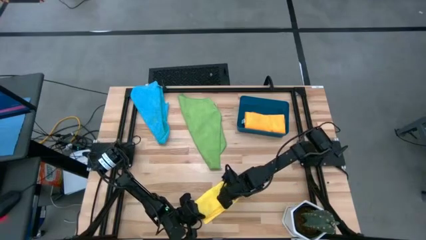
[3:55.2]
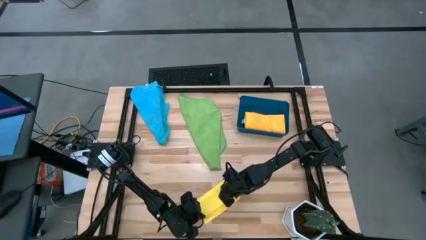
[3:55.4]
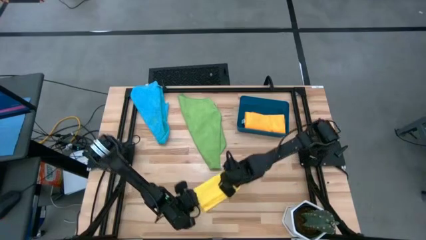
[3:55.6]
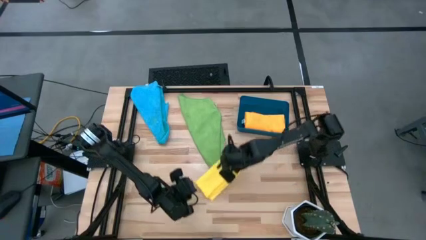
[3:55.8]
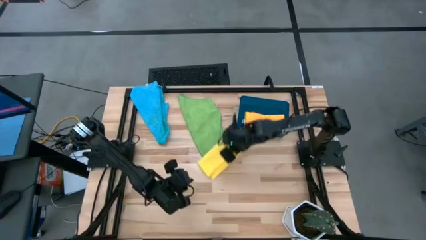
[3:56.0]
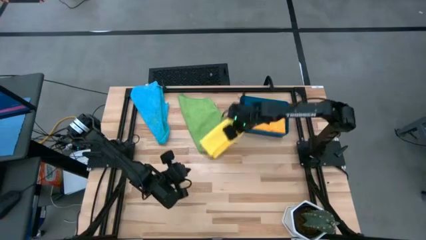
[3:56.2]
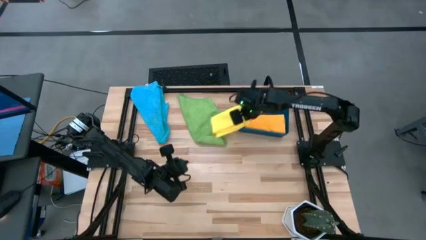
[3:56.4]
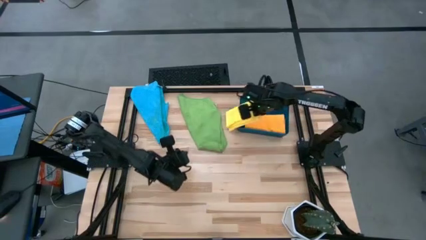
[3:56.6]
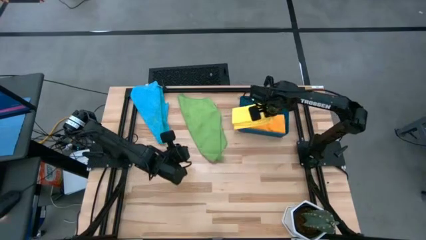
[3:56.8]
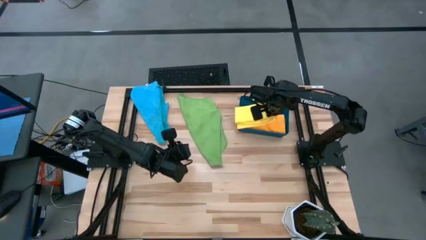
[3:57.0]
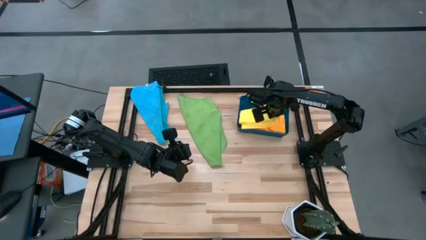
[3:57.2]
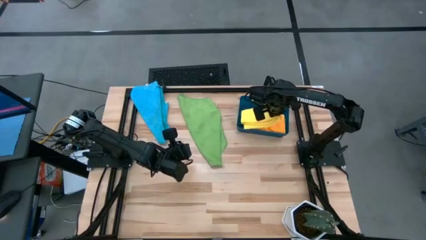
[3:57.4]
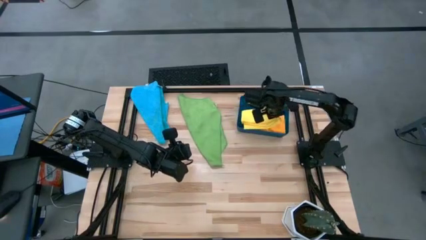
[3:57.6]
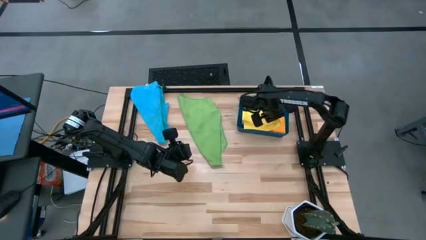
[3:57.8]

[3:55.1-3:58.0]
Task: Fold microfiber towels
Put the yellow microfiber cloth into the blue bin

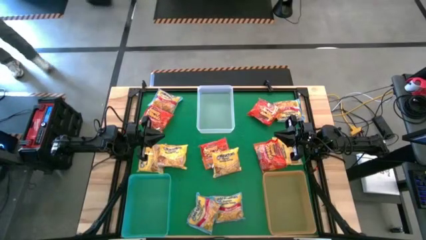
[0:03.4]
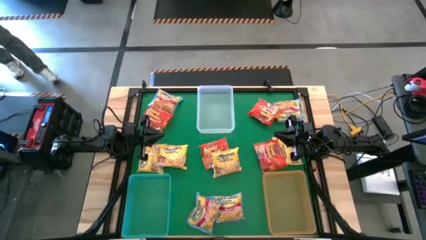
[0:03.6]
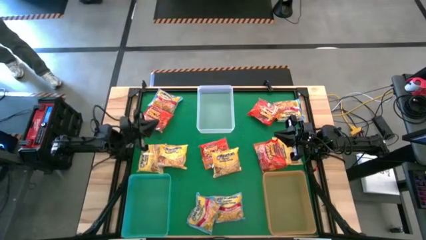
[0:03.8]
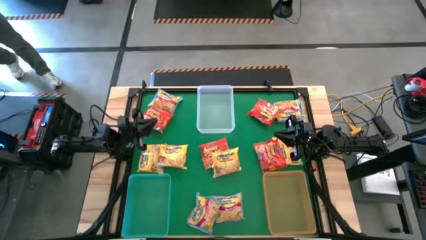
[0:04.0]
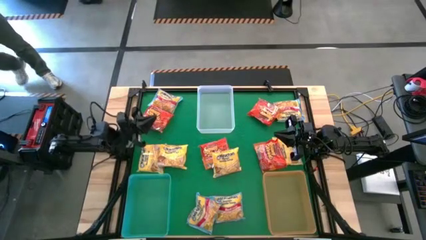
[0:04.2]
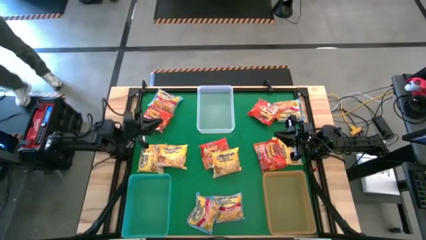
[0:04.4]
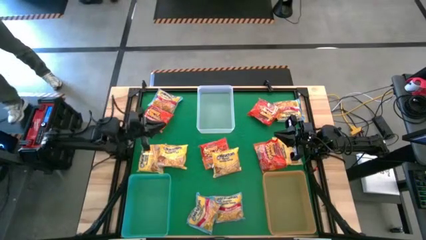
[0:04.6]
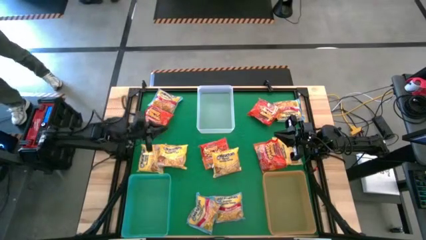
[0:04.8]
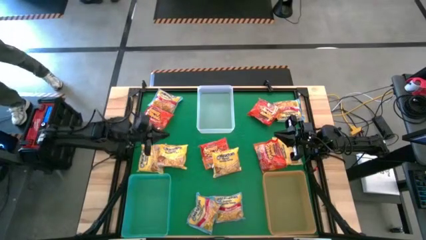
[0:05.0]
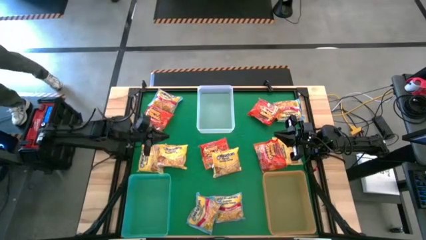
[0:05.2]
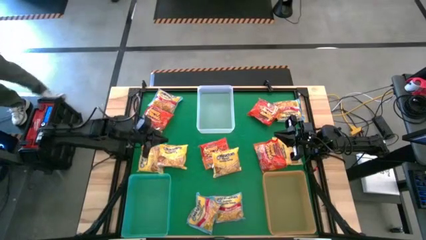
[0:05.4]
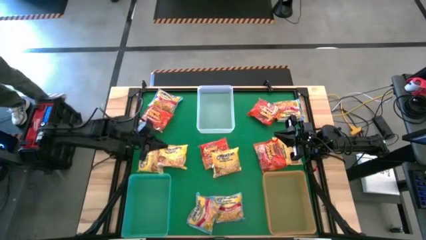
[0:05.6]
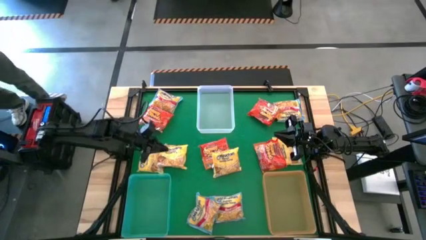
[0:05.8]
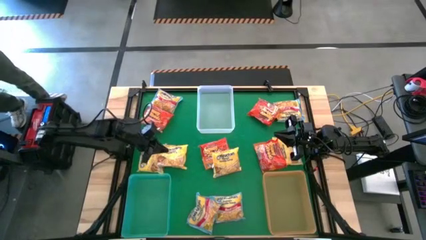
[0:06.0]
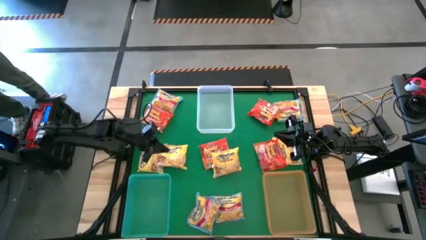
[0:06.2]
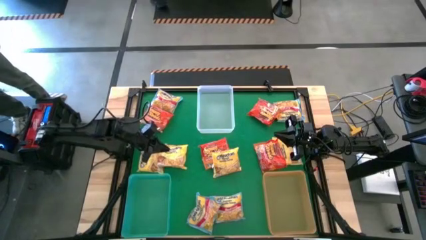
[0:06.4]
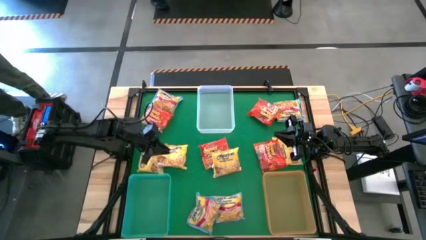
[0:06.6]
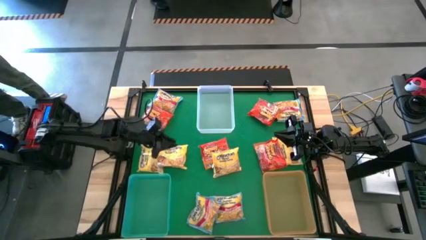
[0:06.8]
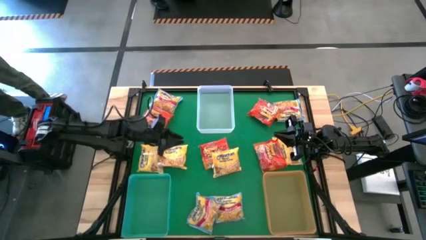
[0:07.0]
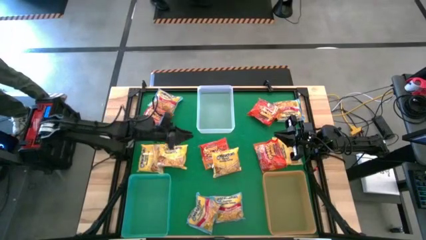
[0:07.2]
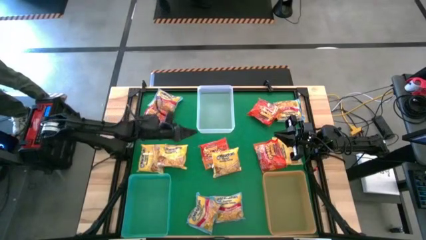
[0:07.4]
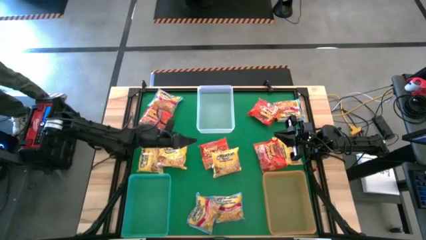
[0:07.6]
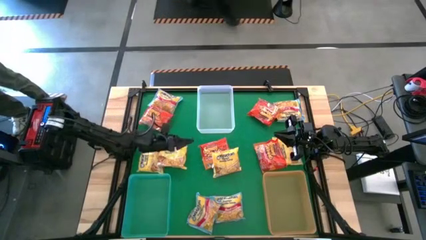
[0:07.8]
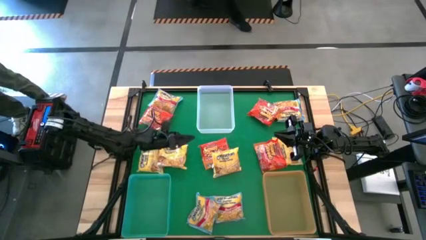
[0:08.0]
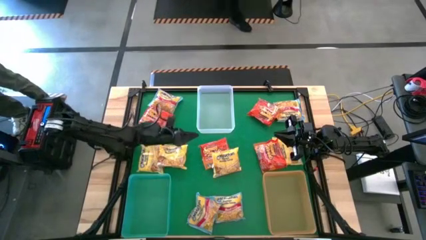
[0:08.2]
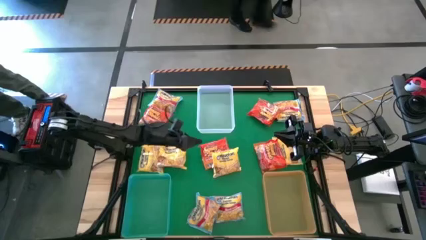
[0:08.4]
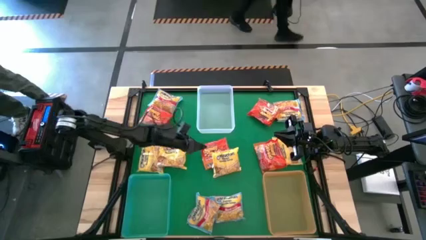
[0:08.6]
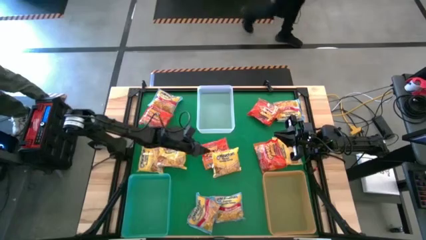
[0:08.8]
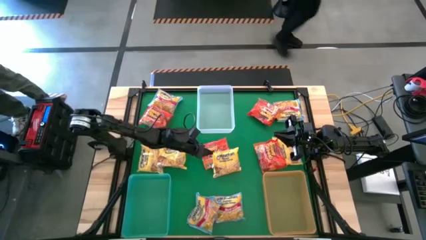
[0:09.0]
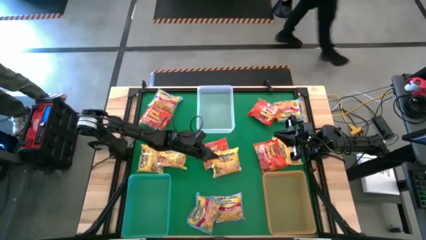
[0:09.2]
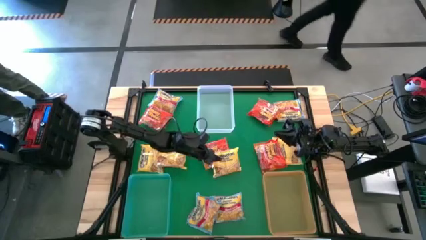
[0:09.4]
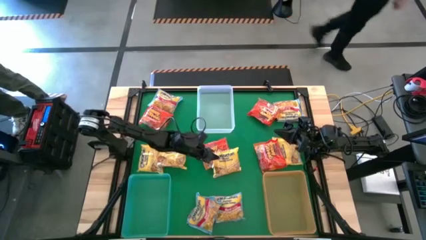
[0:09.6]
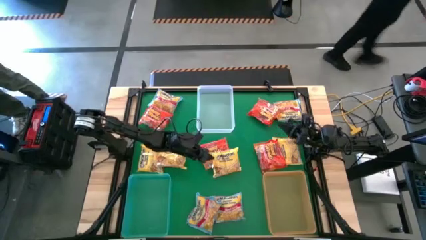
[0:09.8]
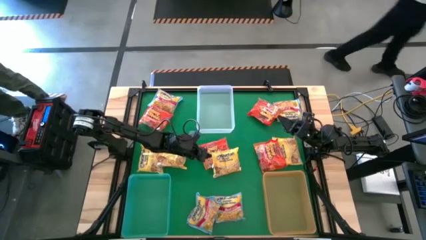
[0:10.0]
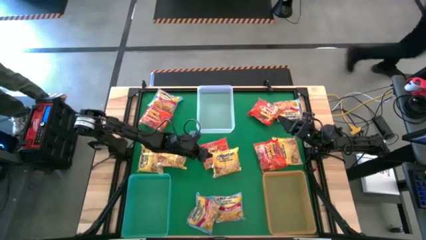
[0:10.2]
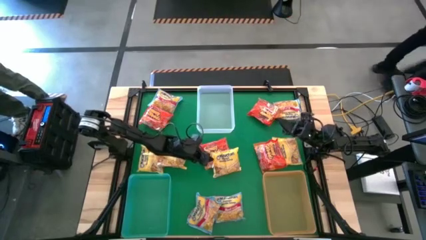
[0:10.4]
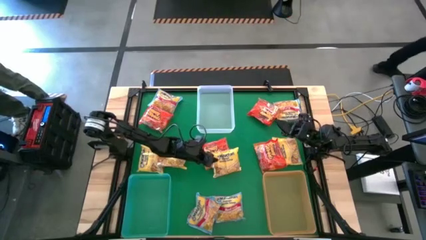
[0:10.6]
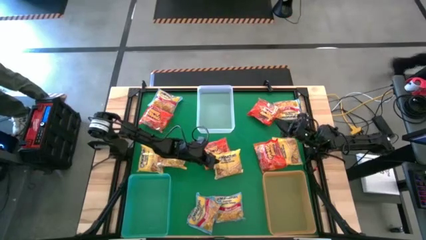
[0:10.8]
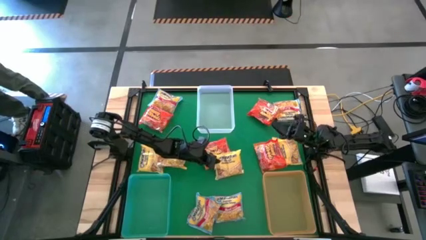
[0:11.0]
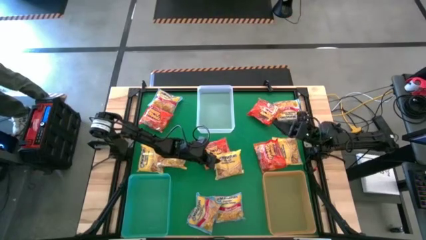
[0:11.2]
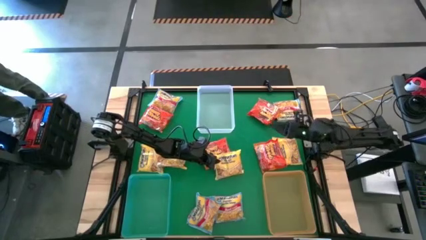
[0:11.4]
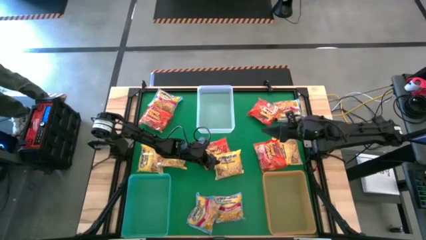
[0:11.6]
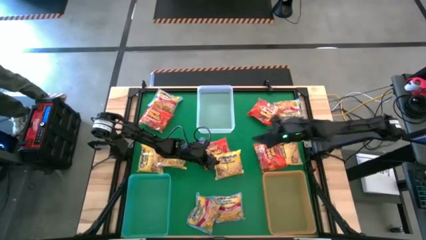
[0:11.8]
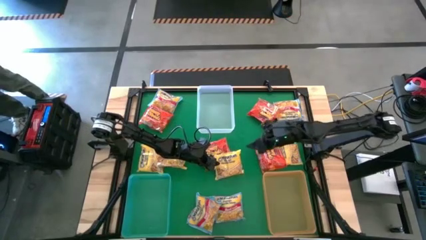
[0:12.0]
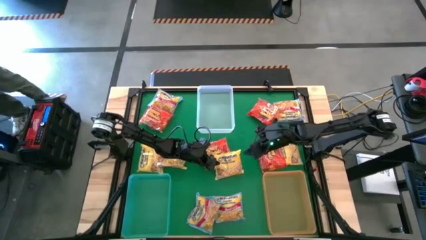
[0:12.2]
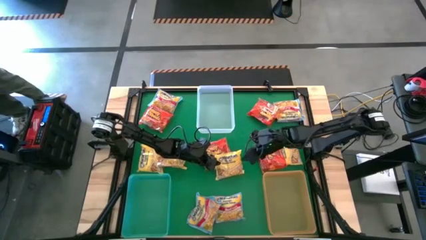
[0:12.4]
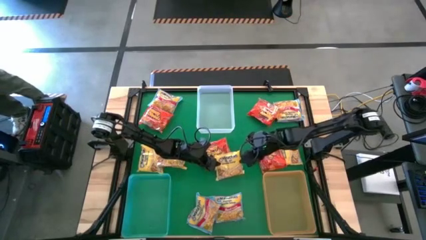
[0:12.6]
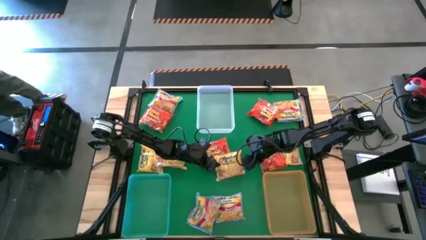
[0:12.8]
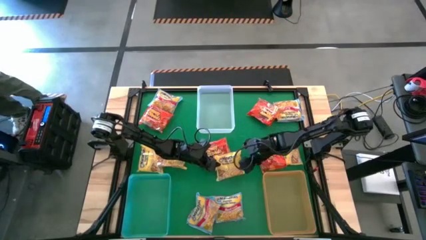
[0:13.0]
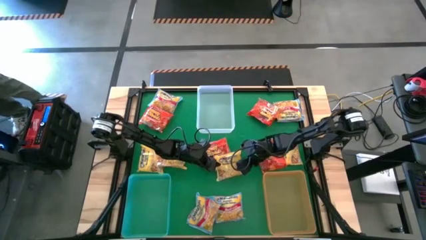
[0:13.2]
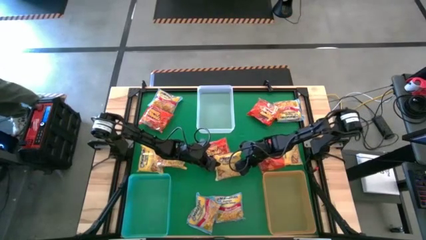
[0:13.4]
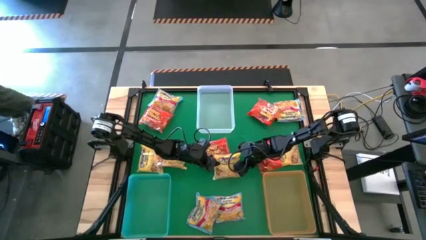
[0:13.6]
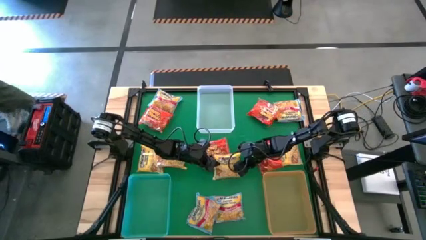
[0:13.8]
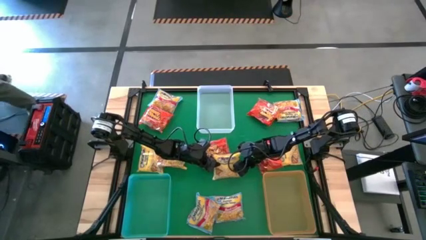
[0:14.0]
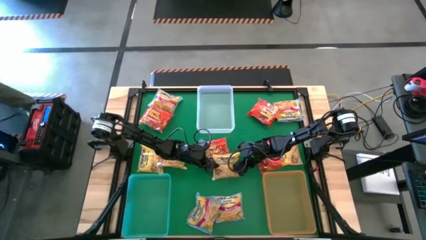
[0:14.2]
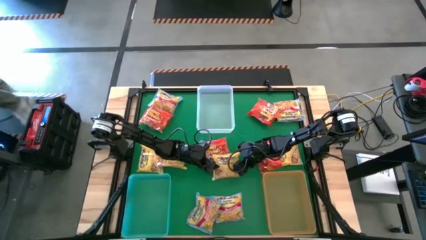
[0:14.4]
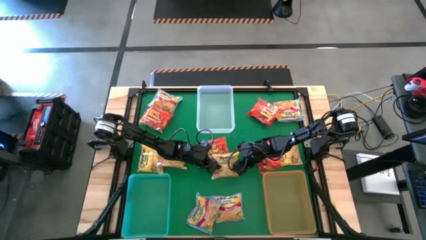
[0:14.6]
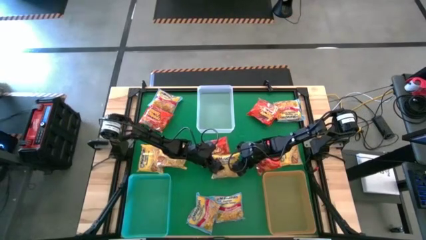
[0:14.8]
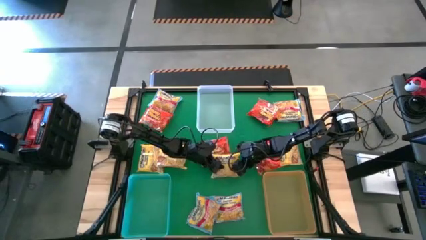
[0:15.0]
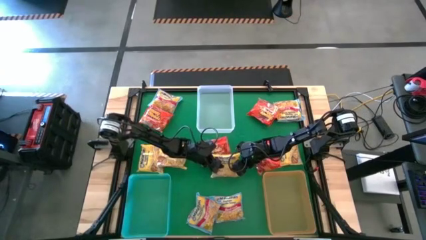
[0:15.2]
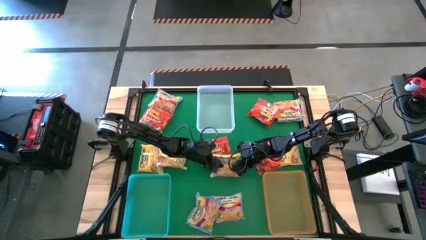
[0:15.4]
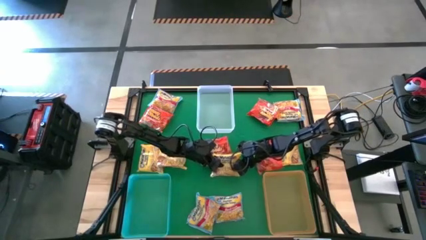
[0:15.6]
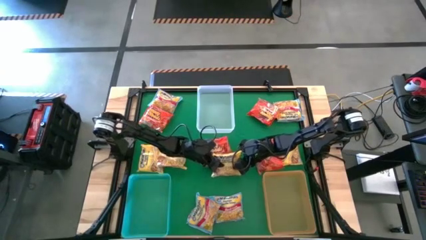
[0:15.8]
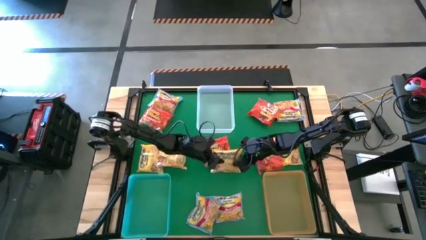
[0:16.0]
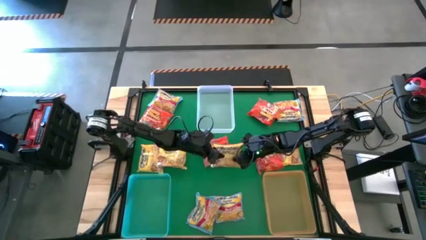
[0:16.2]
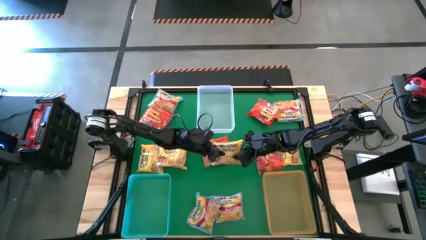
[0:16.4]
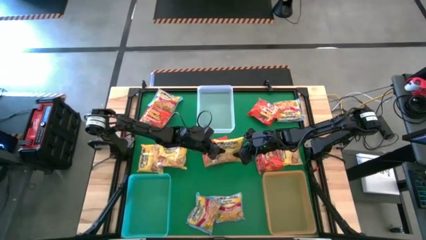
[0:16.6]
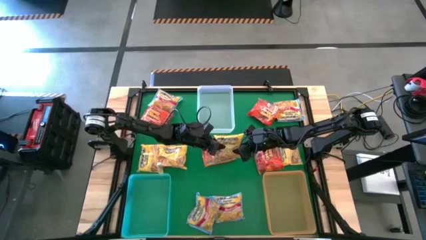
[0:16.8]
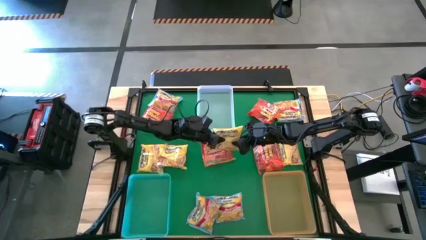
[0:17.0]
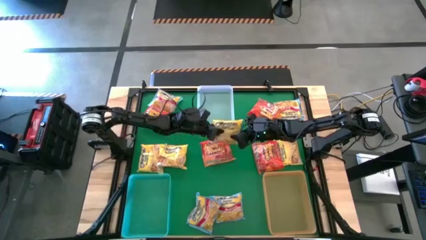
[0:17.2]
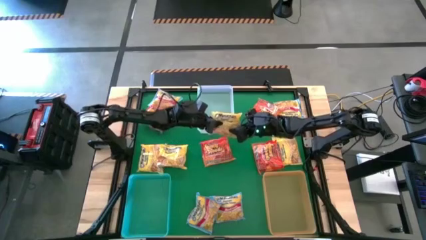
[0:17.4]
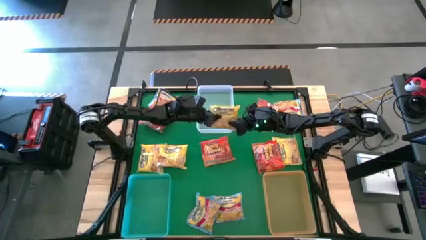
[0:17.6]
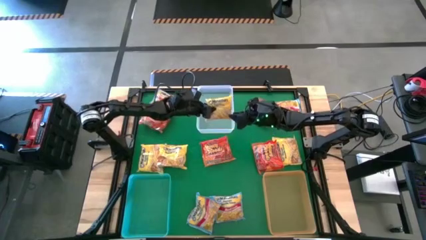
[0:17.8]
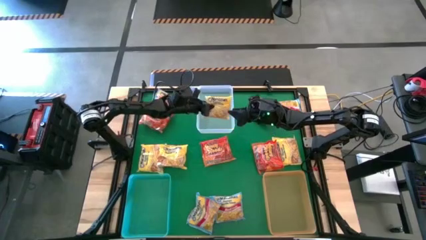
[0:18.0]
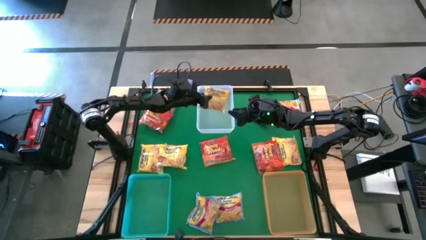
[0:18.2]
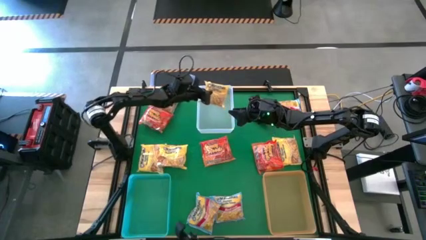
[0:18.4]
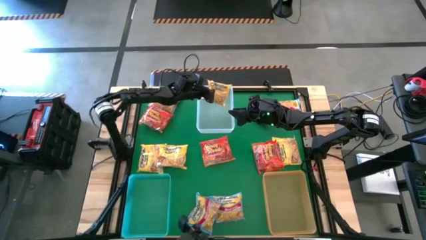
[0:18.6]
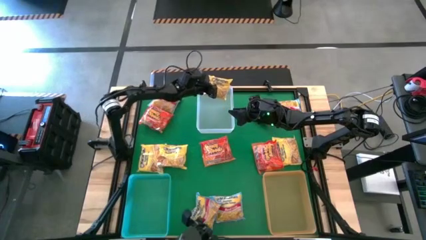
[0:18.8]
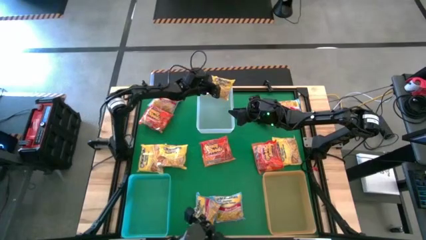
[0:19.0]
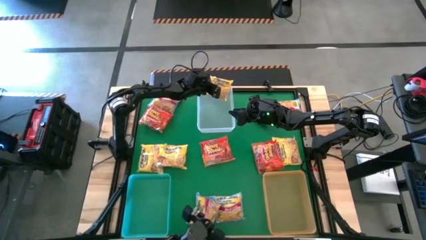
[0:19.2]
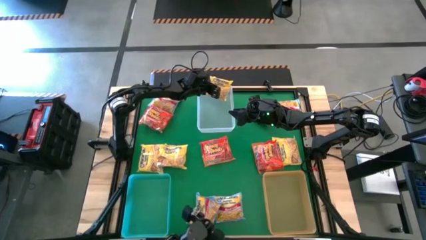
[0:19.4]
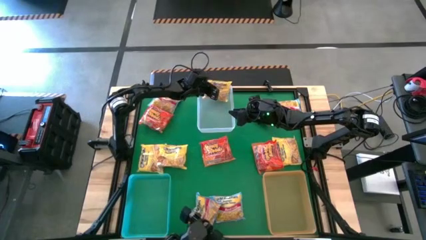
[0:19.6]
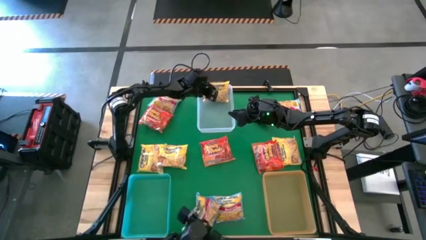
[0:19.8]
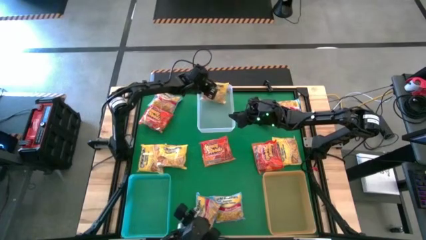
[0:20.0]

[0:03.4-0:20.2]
Task: Sort Maruchan noodles
Put the yellow noodle pack into the transparent bin
